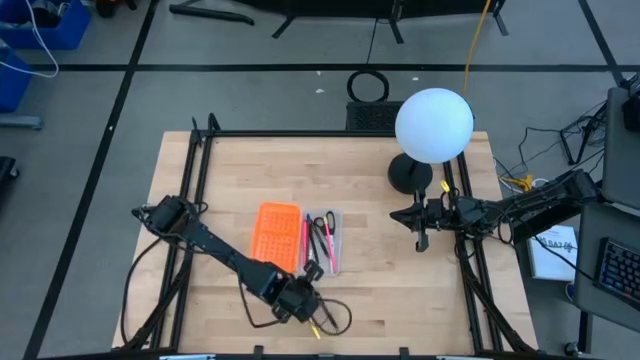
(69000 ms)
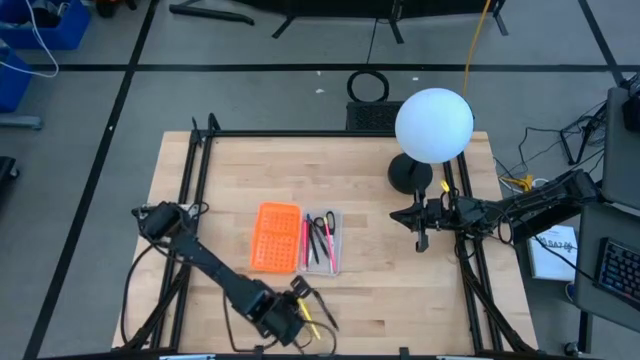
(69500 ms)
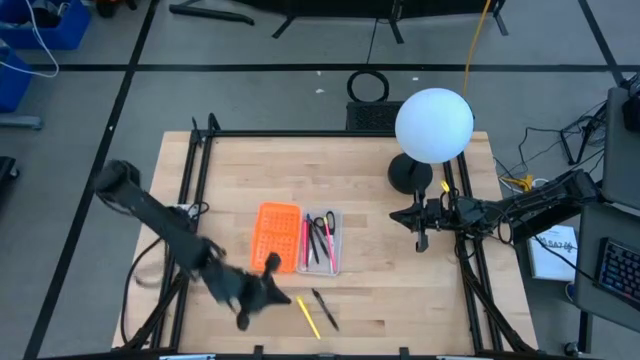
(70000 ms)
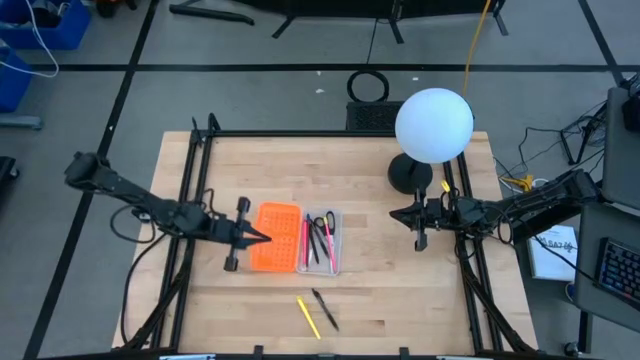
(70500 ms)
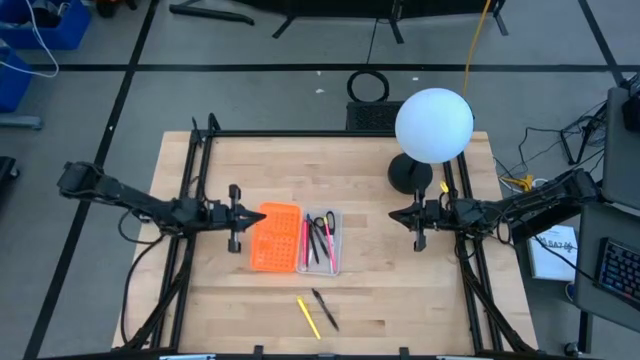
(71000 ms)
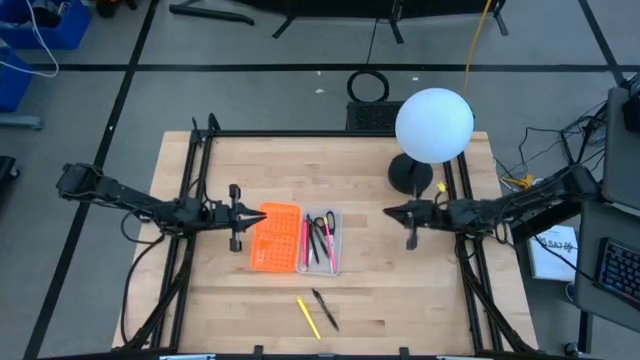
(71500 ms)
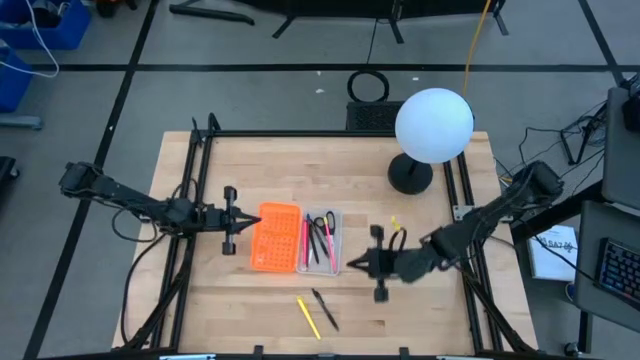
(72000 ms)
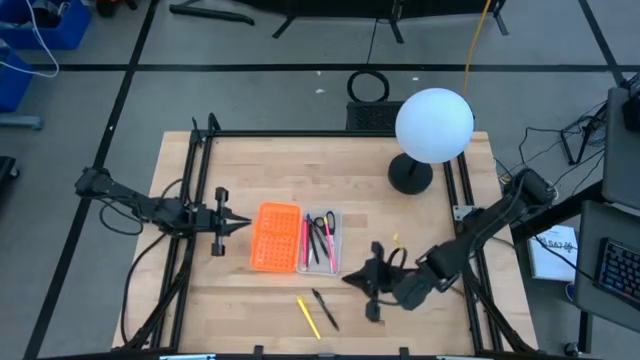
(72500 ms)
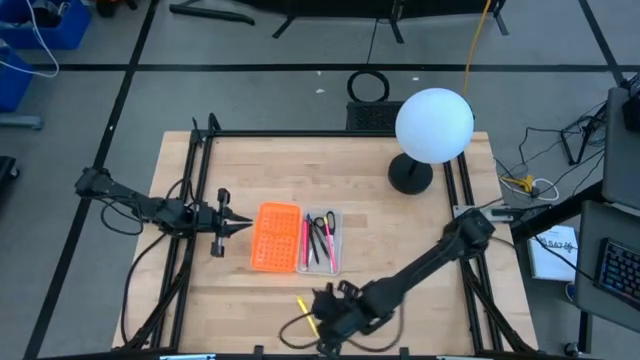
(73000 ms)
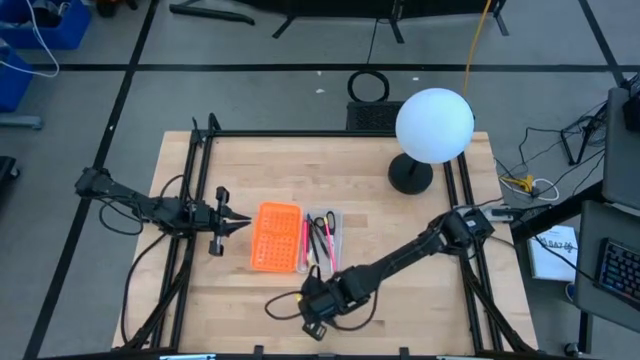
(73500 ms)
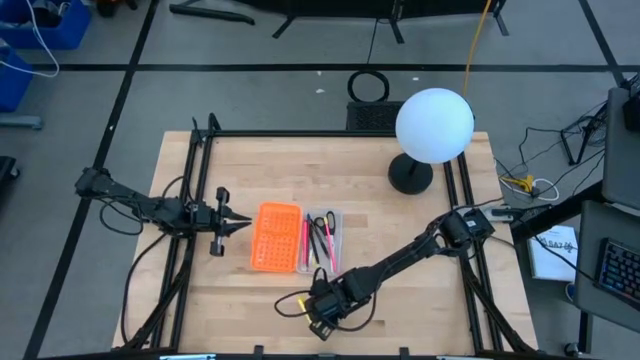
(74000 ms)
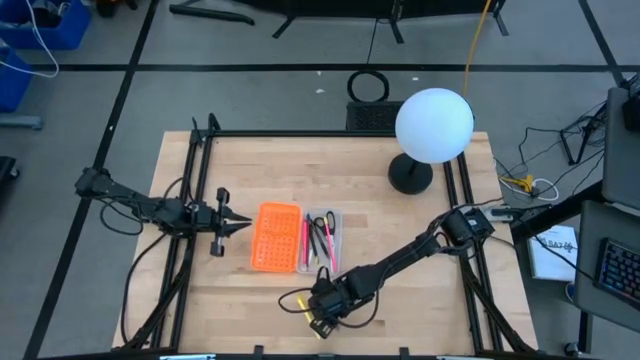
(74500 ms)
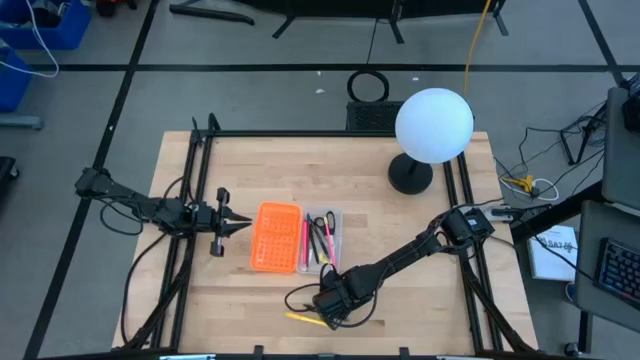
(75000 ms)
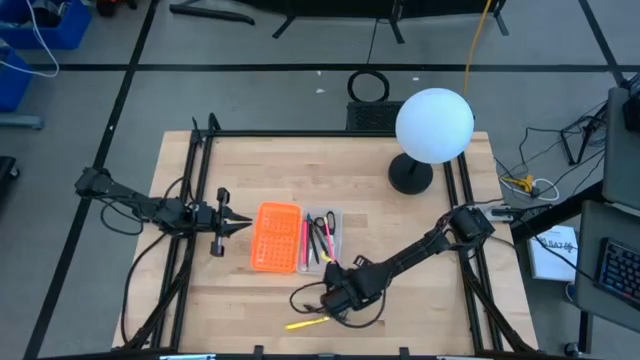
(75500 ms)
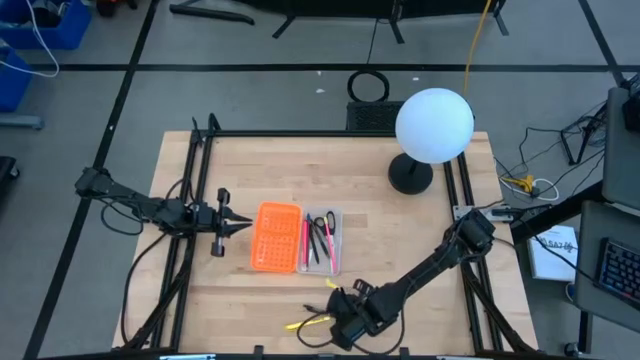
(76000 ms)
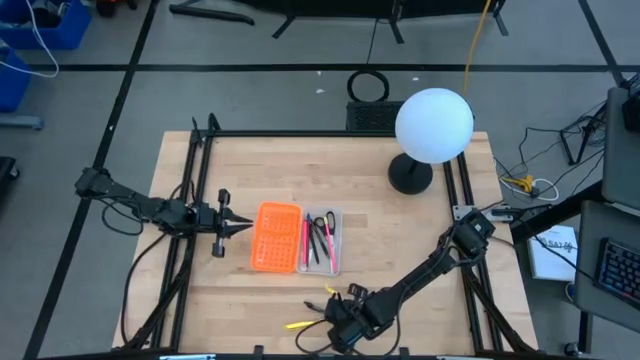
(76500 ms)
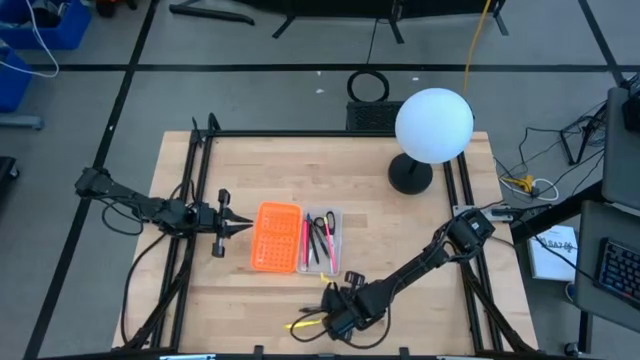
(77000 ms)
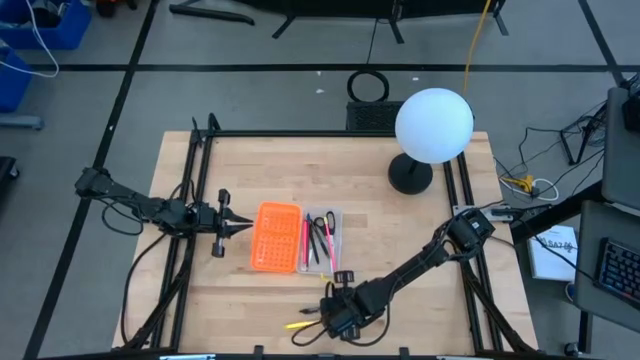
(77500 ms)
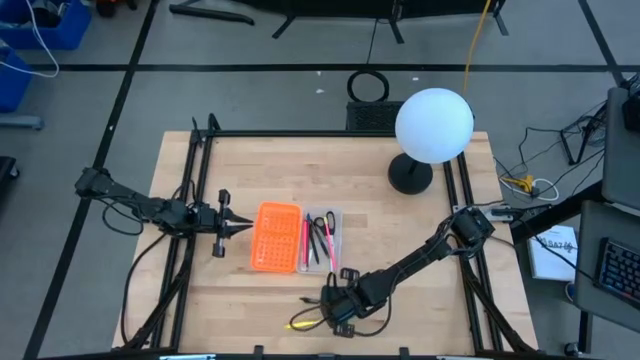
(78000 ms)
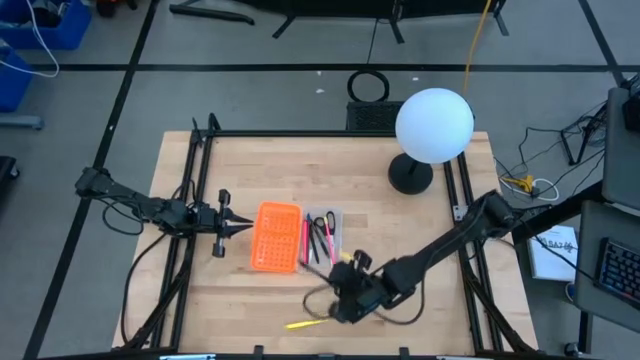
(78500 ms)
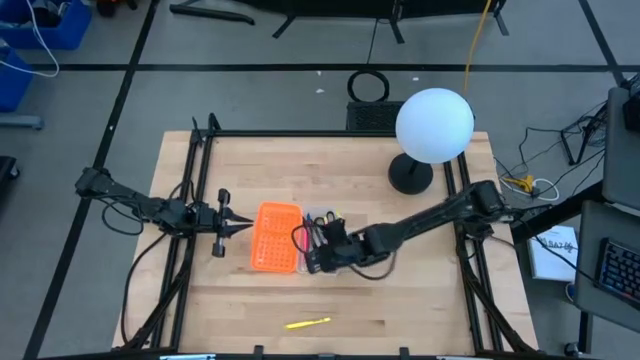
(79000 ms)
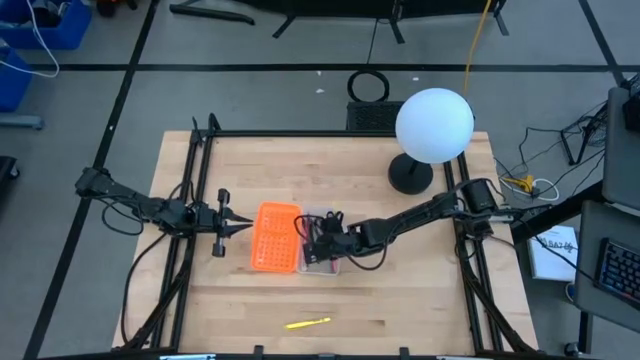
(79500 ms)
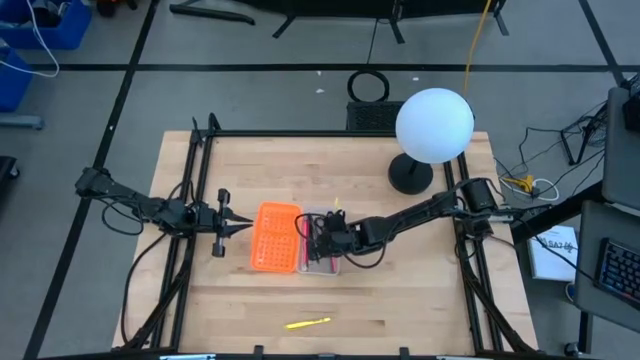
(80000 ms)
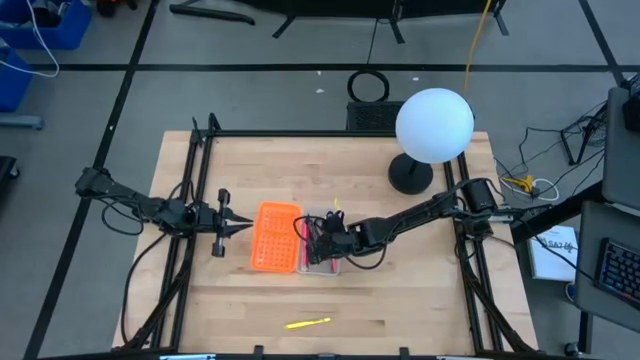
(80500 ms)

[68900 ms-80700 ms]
Task: Pick & place school supplies into a supply box
Put the transparent pen into the transparent supply box

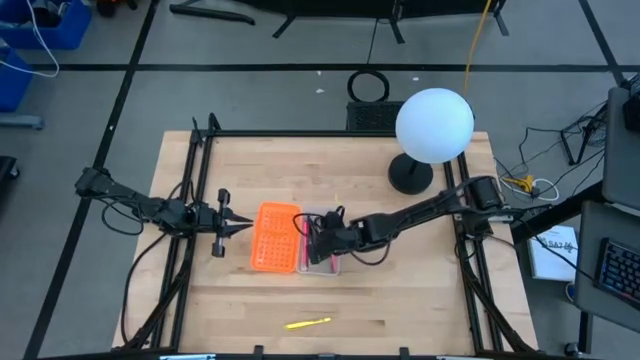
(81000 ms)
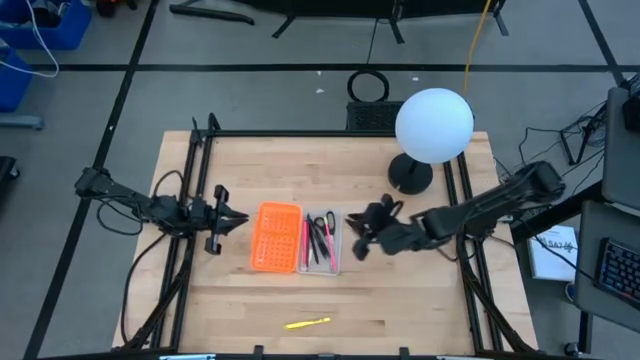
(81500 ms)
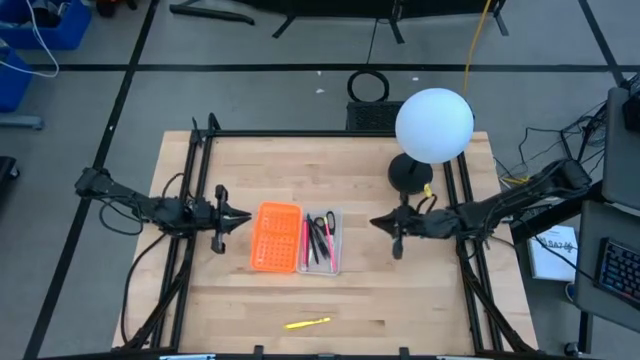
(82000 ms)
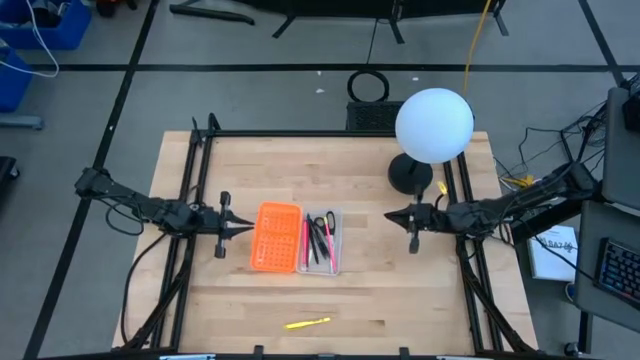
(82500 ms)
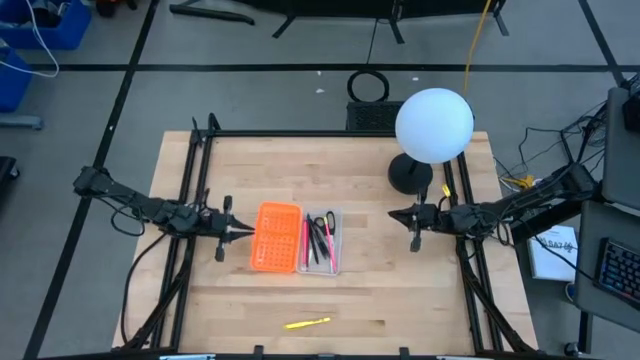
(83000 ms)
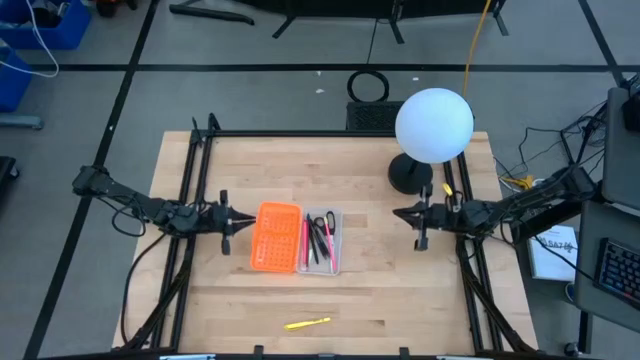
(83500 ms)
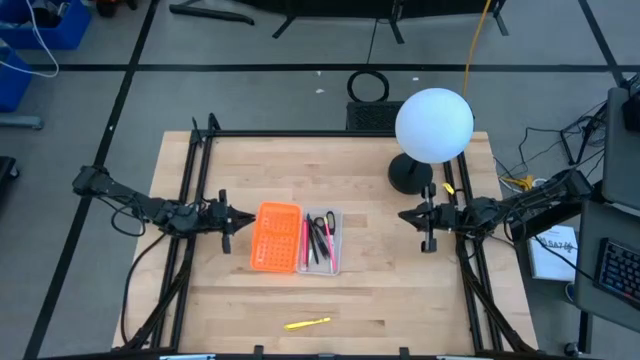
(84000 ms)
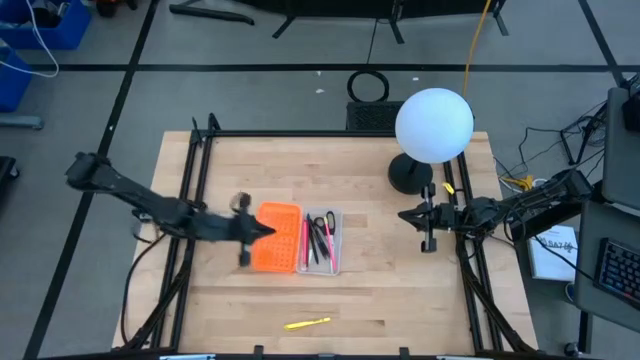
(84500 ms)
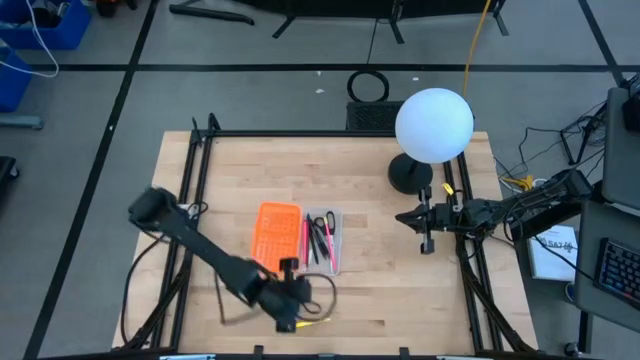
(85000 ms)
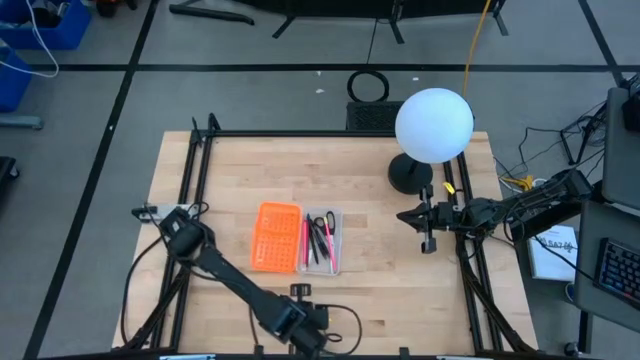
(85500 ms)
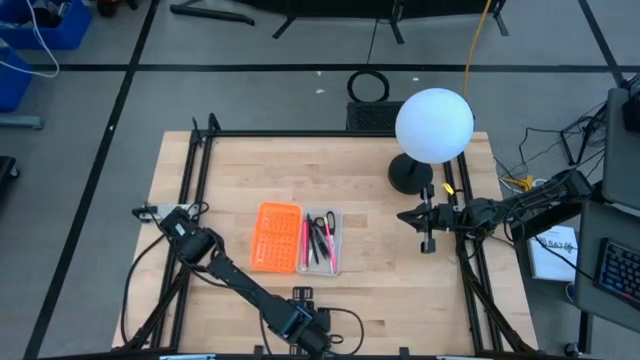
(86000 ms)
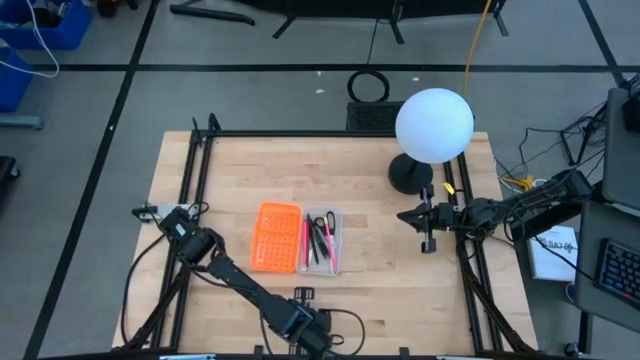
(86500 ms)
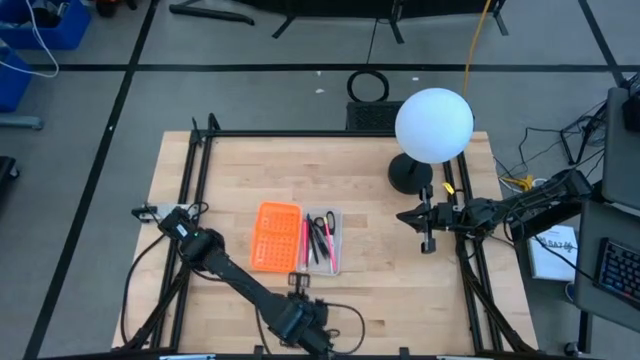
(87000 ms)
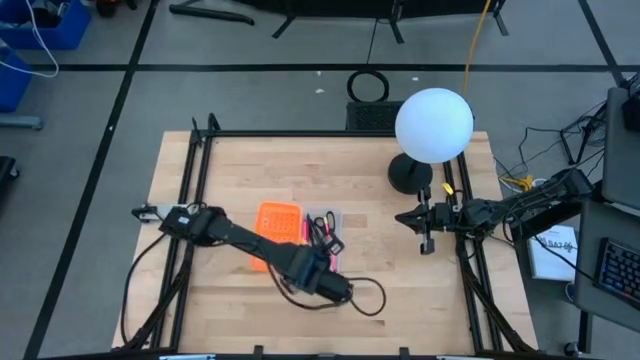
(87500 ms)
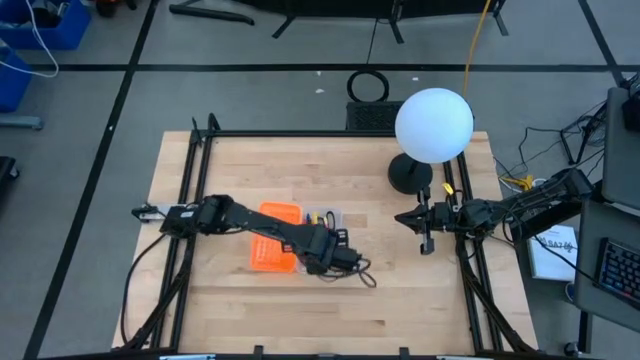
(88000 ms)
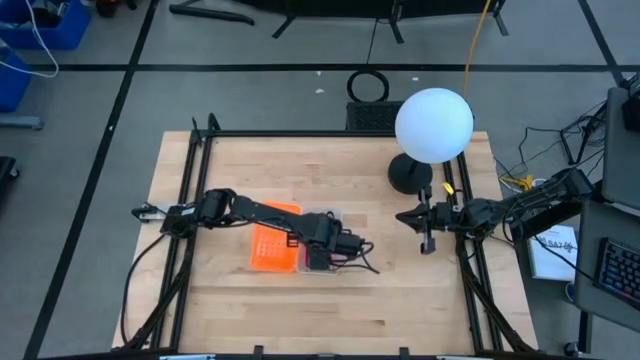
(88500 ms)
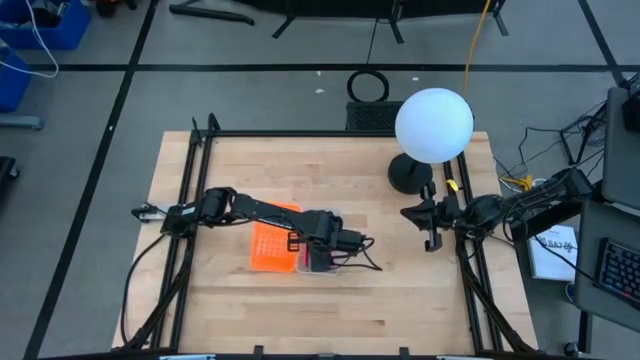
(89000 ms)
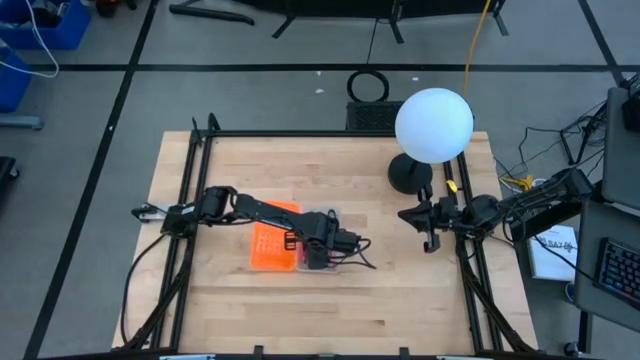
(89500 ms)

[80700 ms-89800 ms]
Put the yellow pen into the transparent supply box
